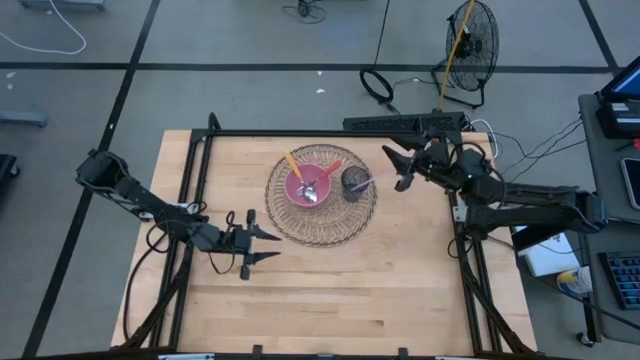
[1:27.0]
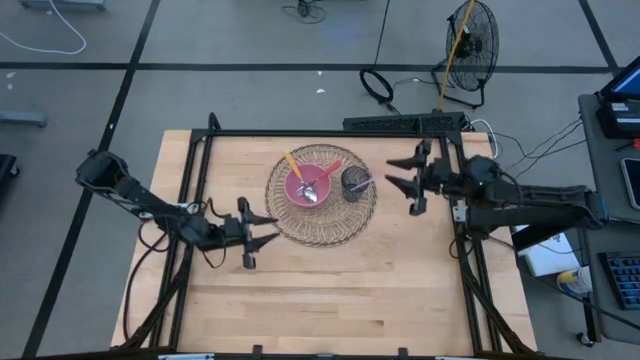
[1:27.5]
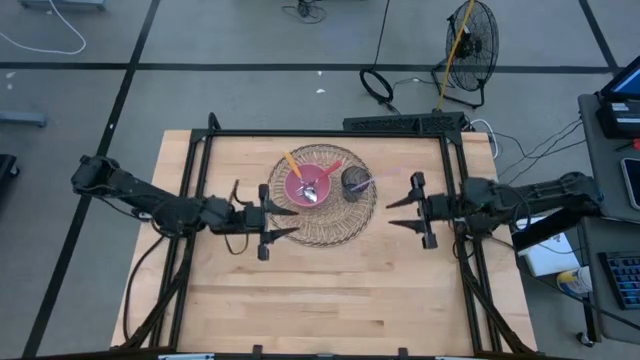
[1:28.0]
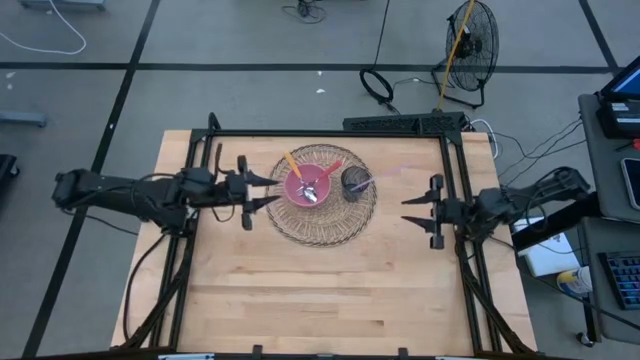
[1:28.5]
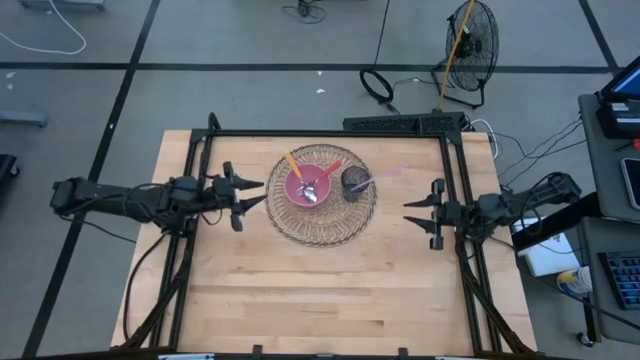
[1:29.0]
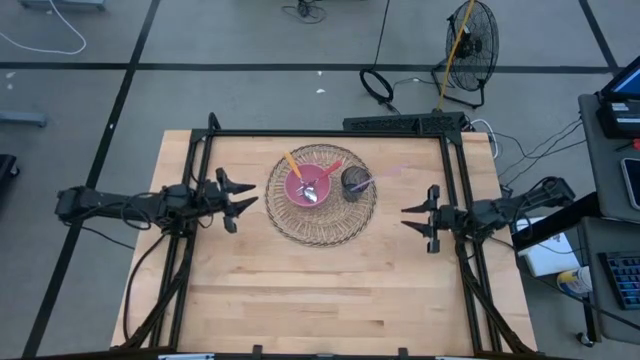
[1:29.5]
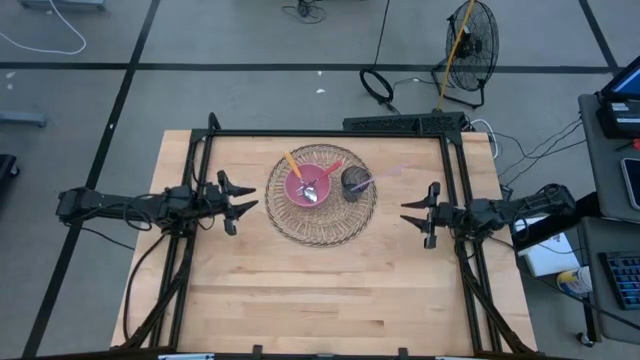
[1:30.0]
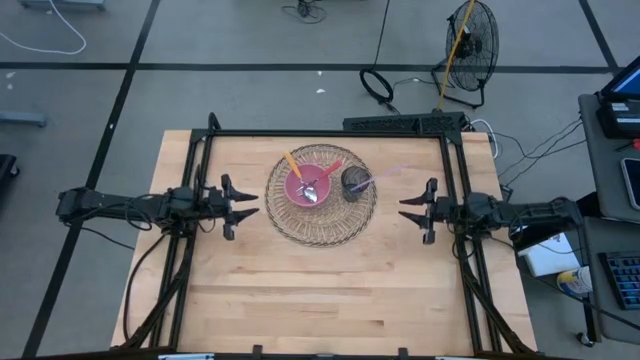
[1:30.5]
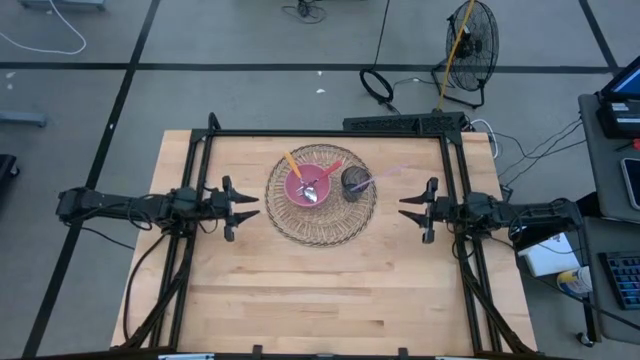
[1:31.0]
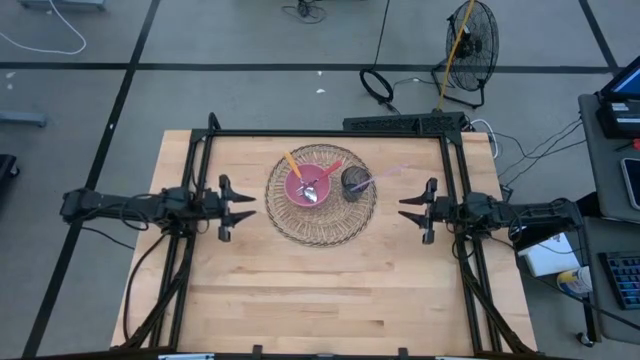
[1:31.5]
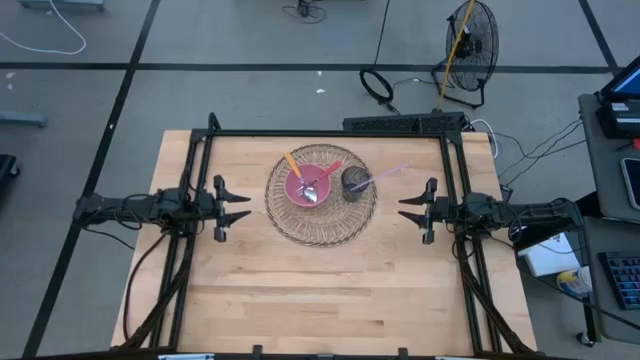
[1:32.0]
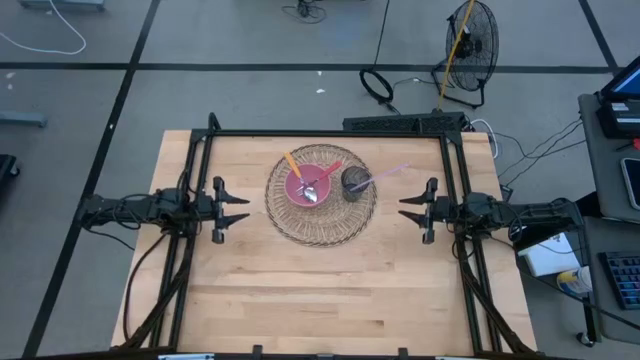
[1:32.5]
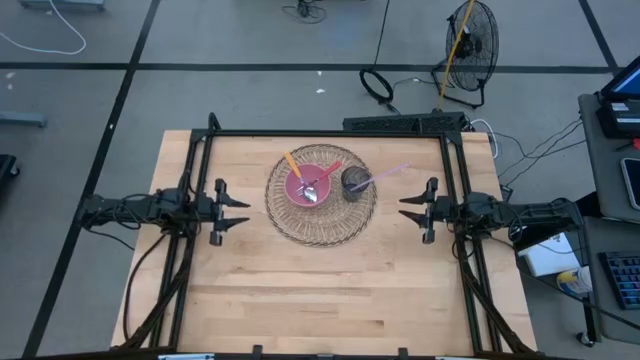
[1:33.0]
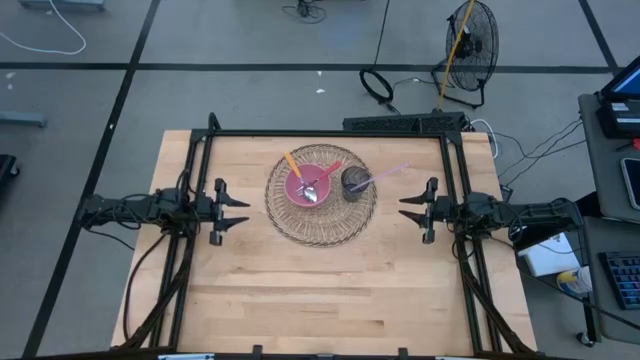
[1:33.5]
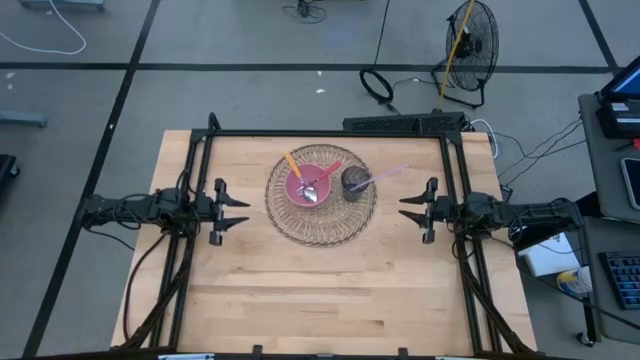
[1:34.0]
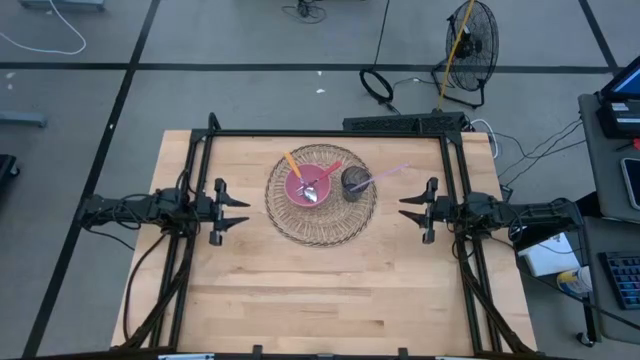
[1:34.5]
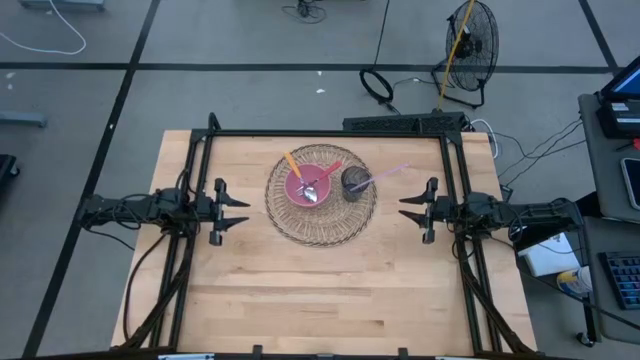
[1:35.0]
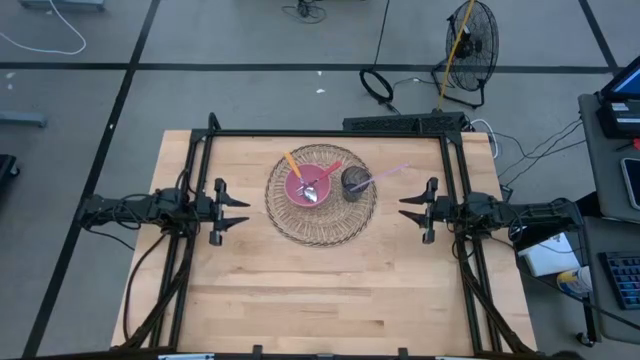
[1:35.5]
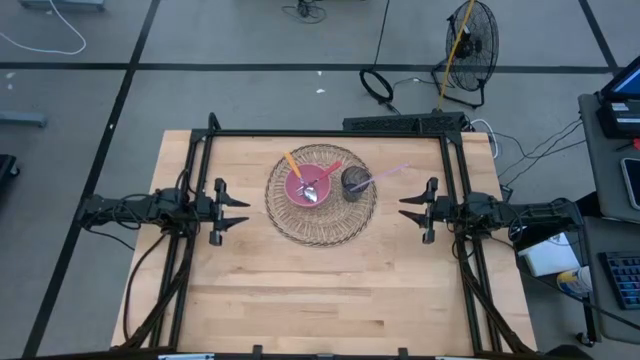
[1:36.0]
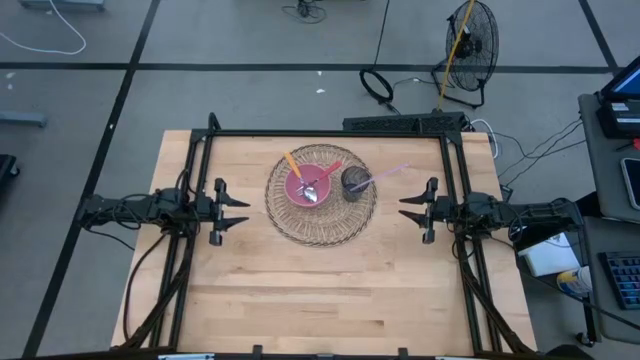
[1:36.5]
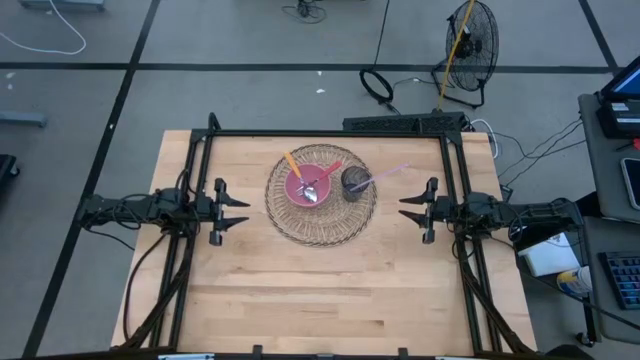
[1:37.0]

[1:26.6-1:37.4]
Task: Pick & Place Utensil
Return to Home Position

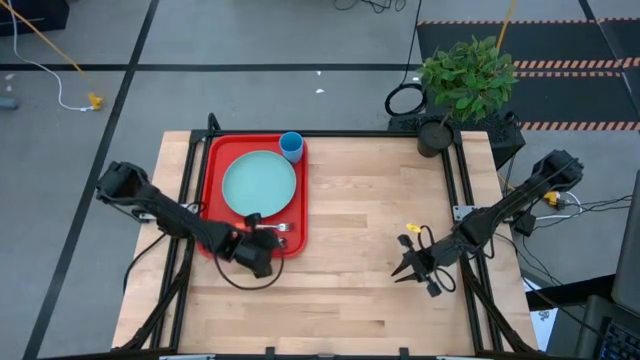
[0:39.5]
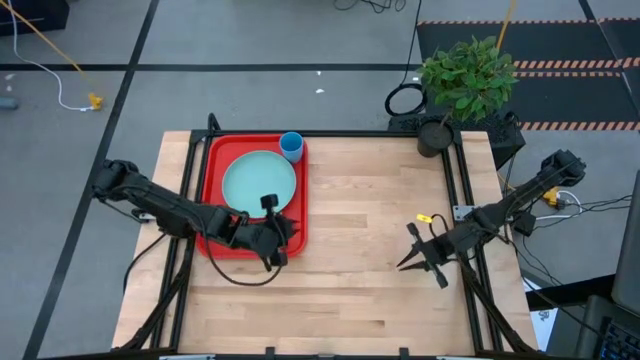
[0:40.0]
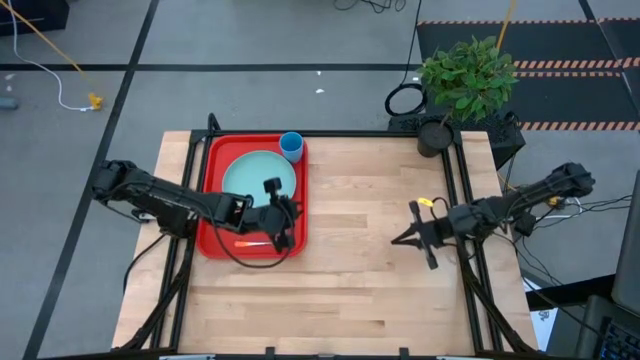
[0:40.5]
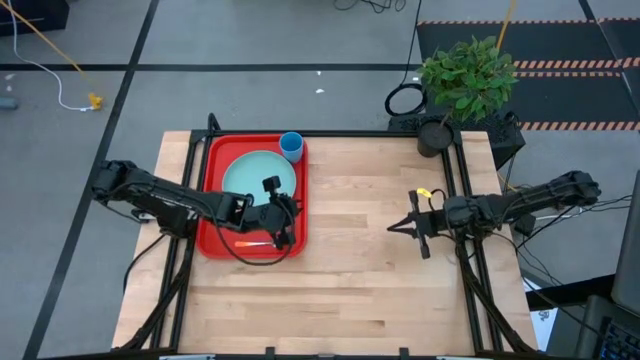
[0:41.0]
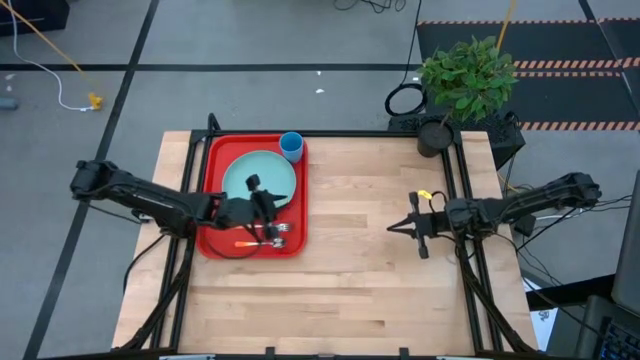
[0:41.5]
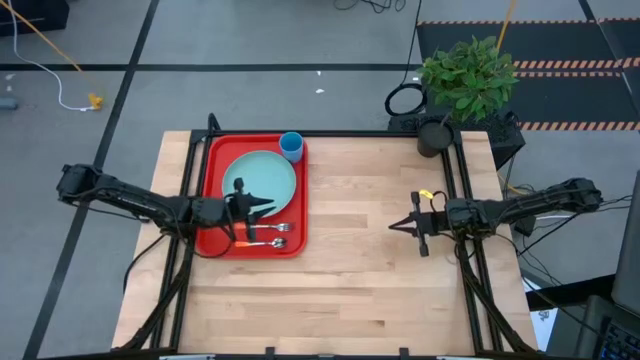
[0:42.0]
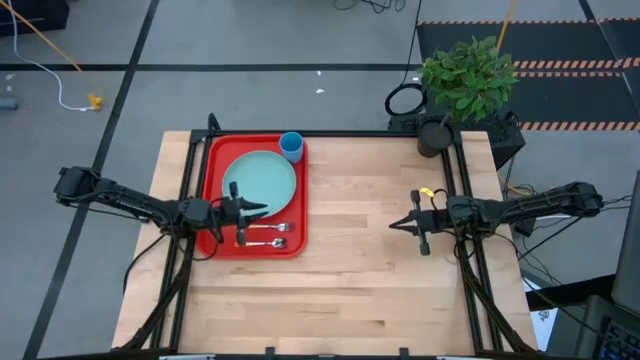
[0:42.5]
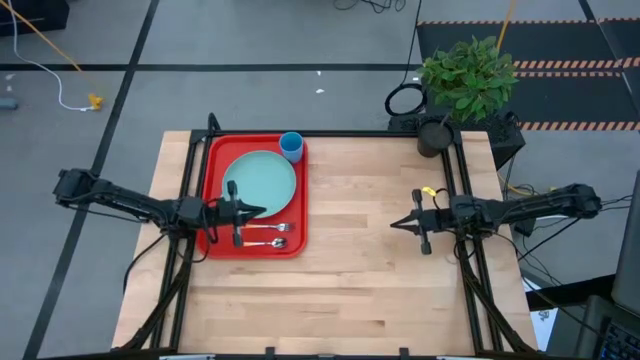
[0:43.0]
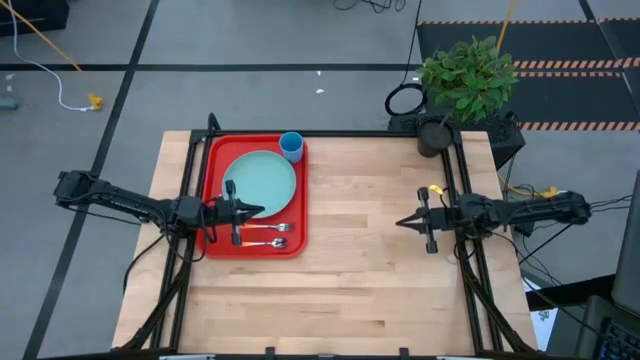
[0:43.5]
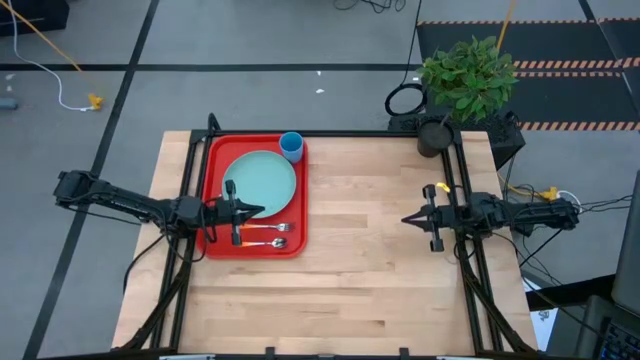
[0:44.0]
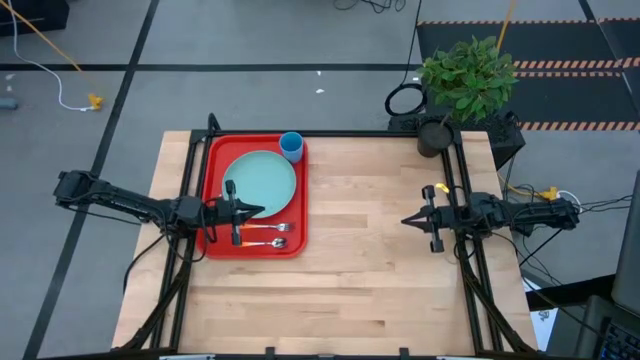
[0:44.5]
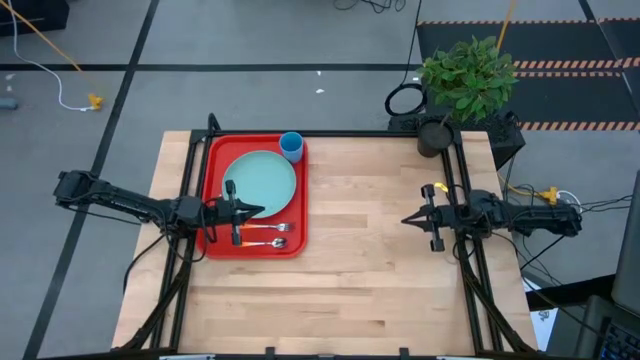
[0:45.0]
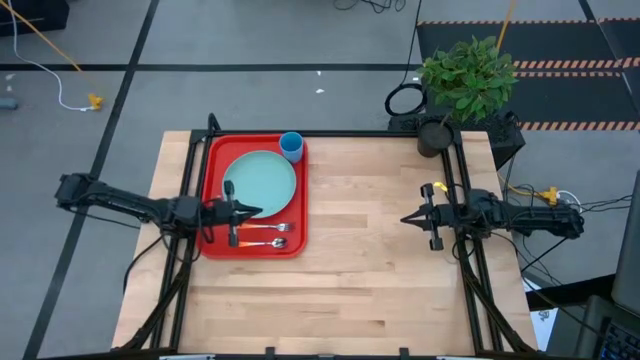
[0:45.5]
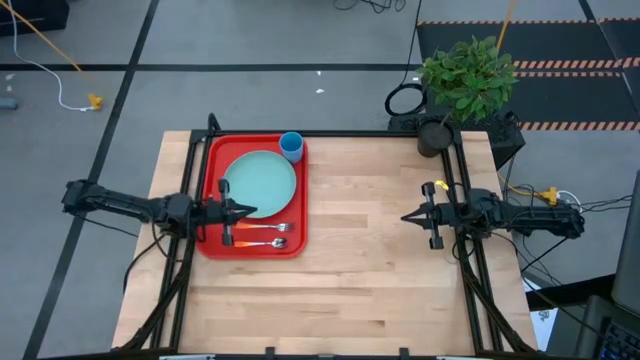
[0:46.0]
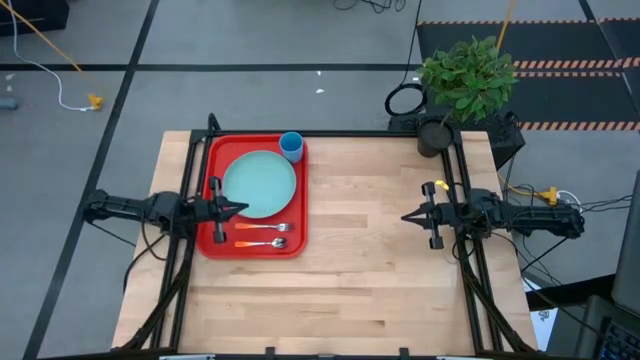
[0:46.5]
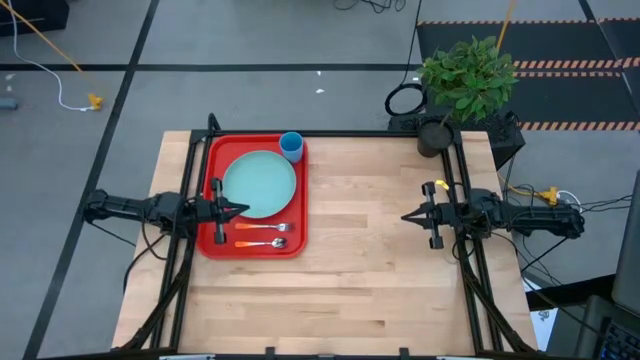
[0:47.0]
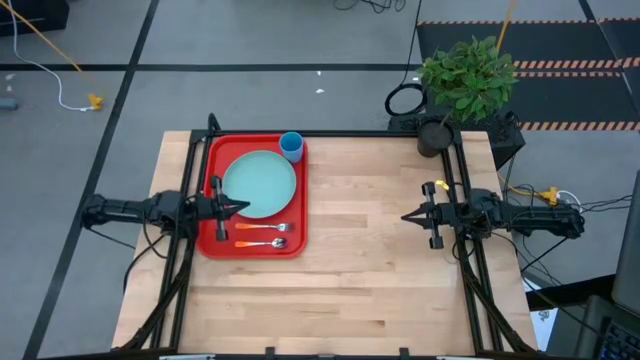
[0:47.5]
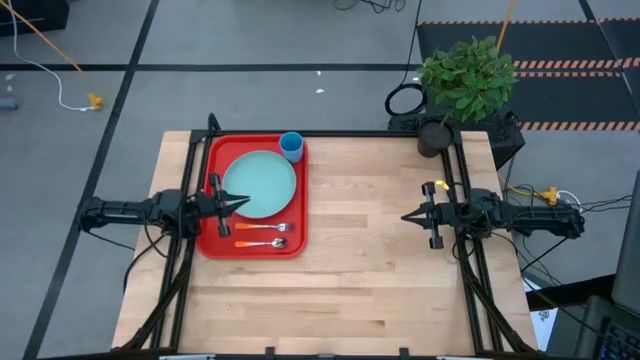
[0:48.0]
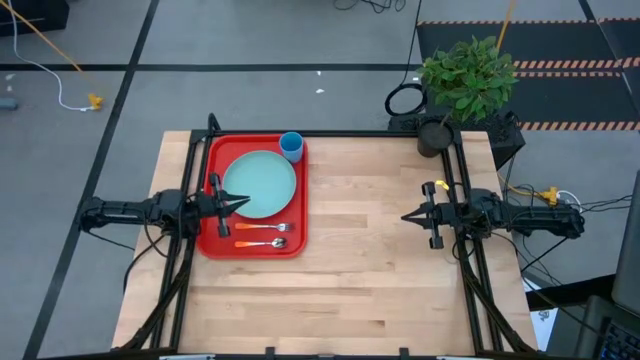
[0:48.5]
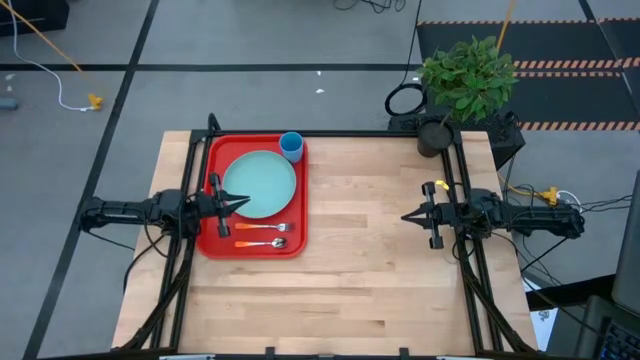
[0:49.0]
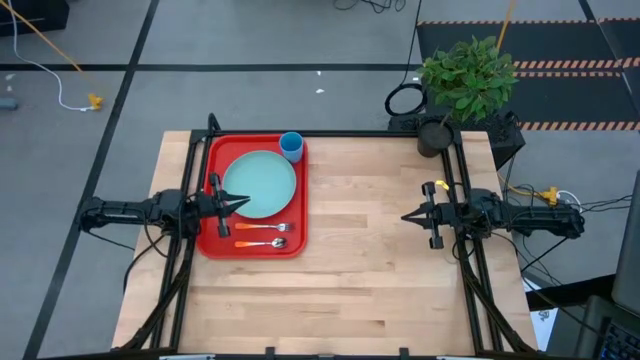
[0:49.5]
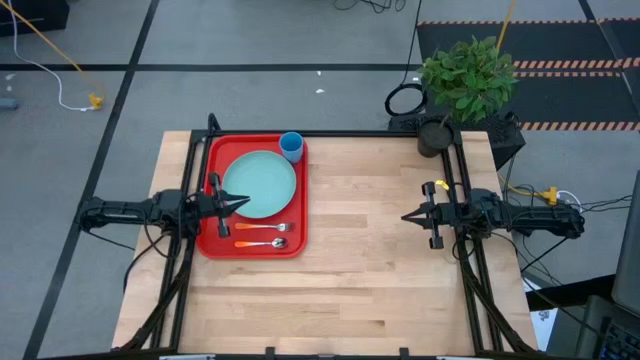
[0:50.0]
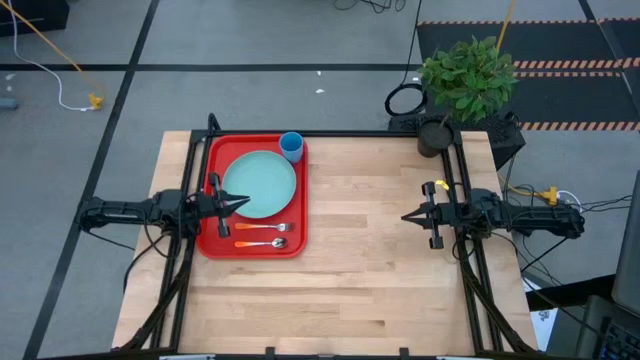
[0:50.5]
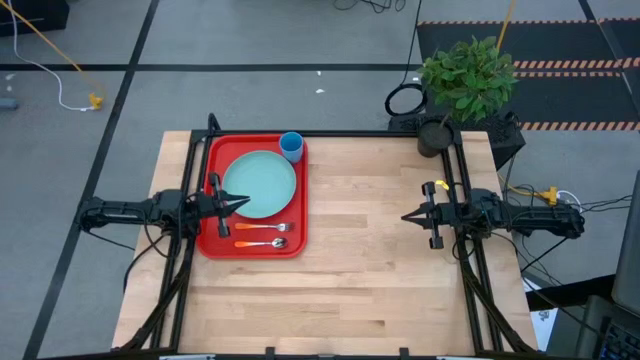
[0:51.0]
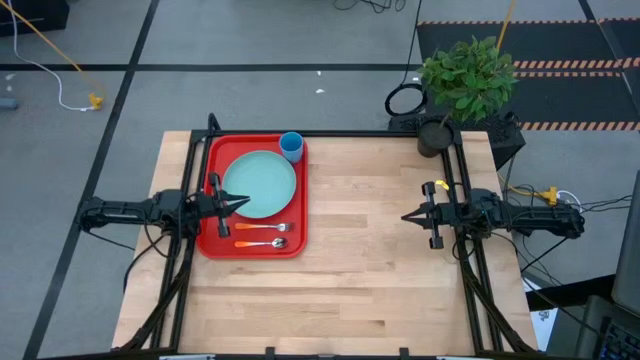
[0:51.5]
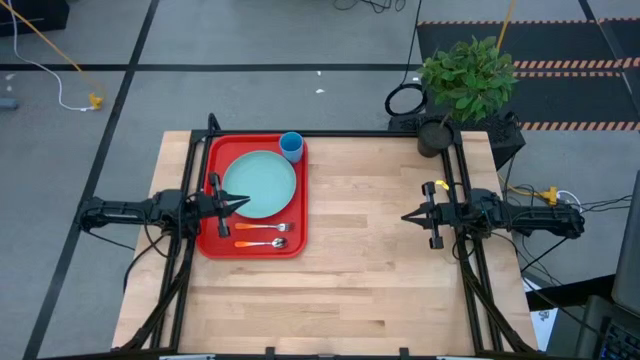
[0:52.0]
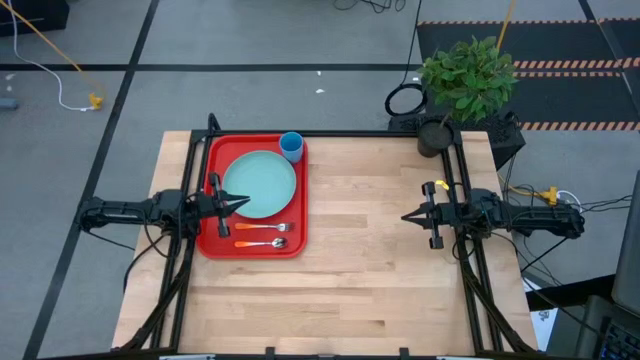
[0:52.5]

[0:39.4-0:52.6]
Task: Pick and place plate/cup/fork/spoon on tray
Return to Home Position
